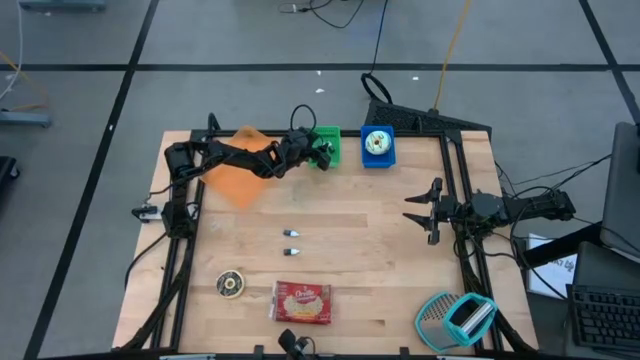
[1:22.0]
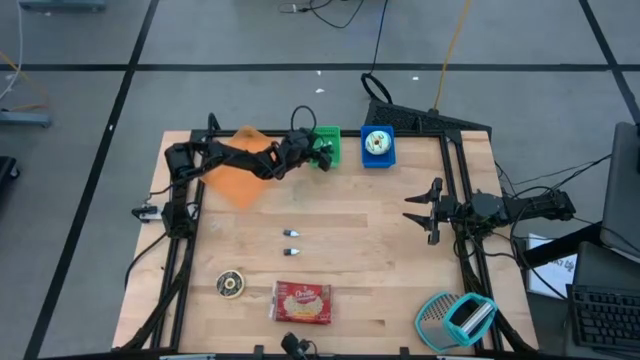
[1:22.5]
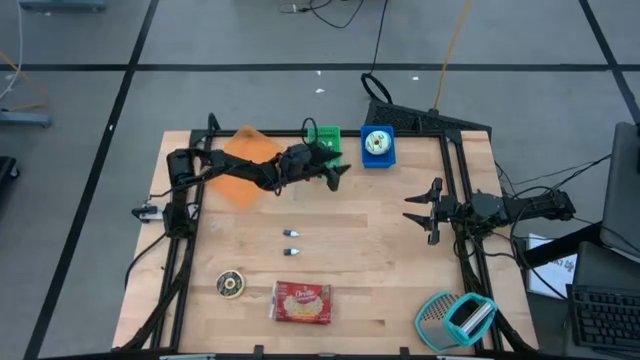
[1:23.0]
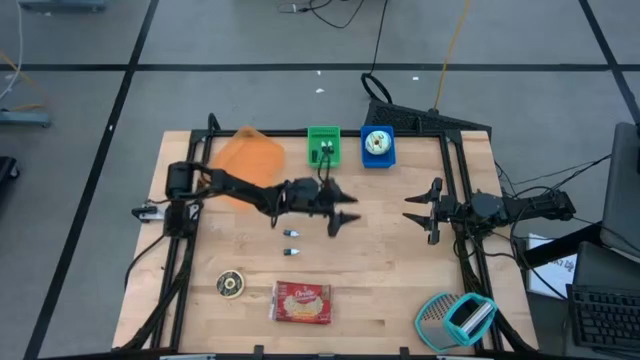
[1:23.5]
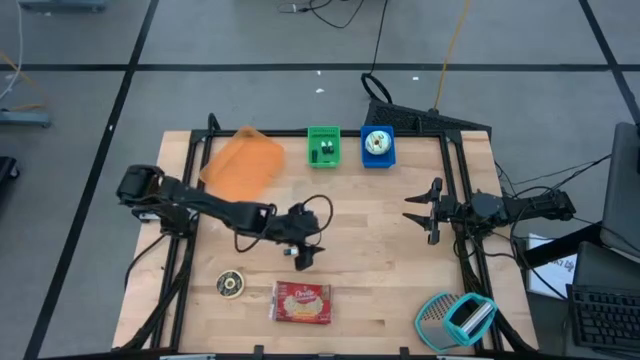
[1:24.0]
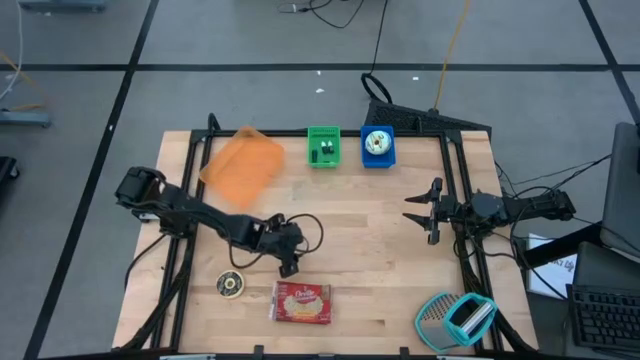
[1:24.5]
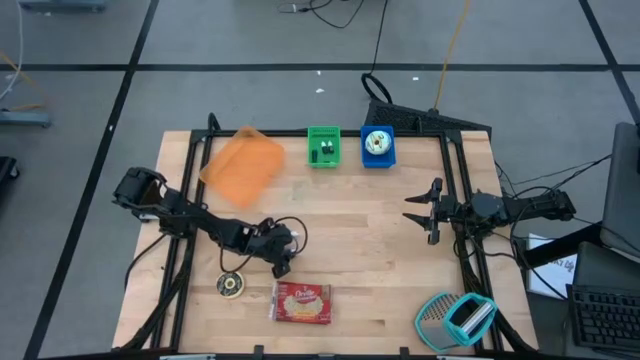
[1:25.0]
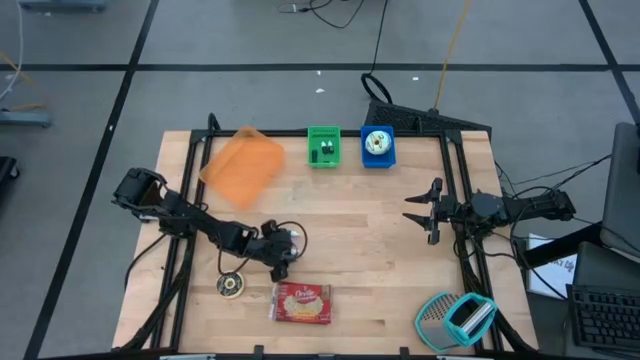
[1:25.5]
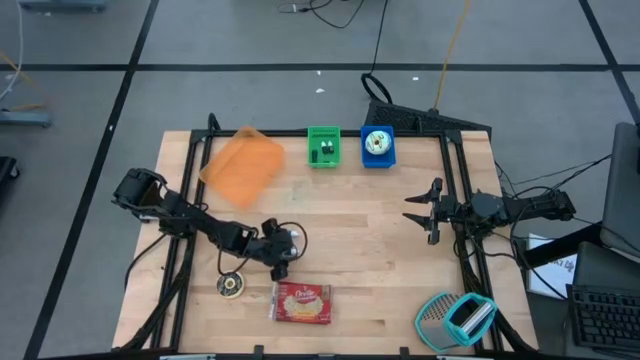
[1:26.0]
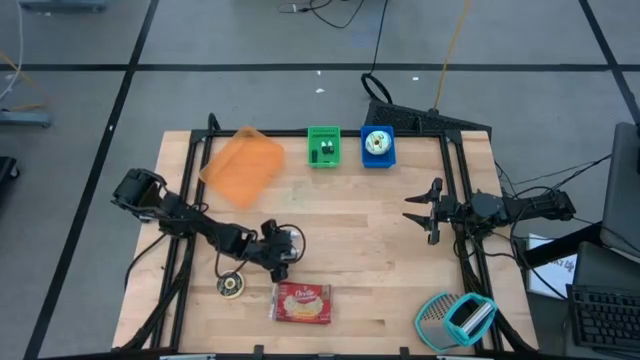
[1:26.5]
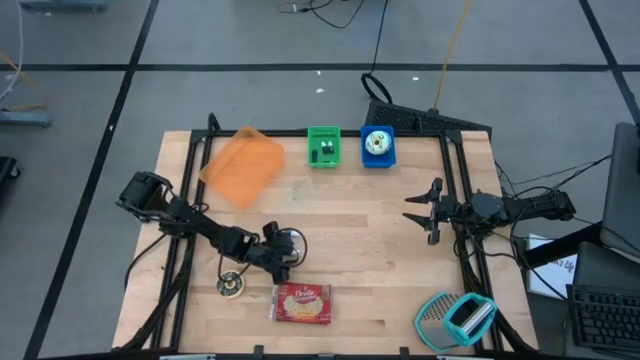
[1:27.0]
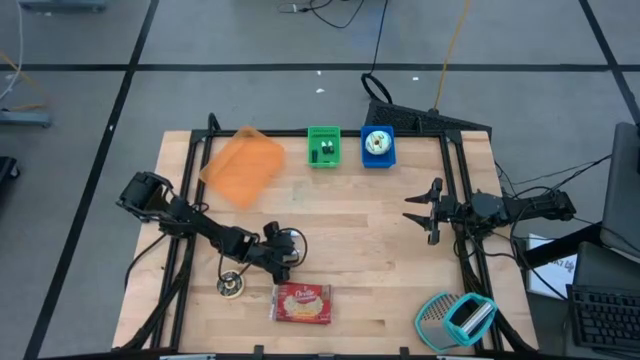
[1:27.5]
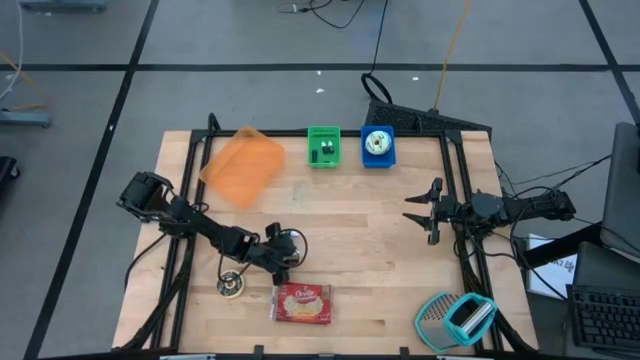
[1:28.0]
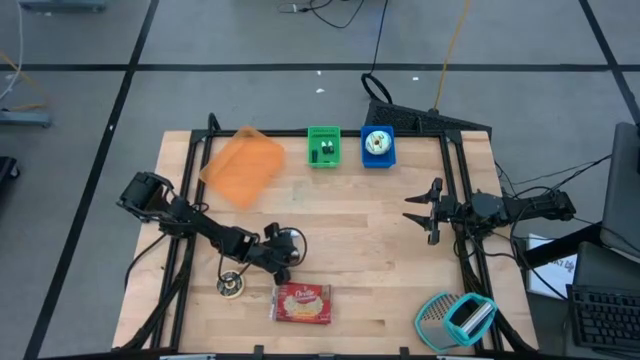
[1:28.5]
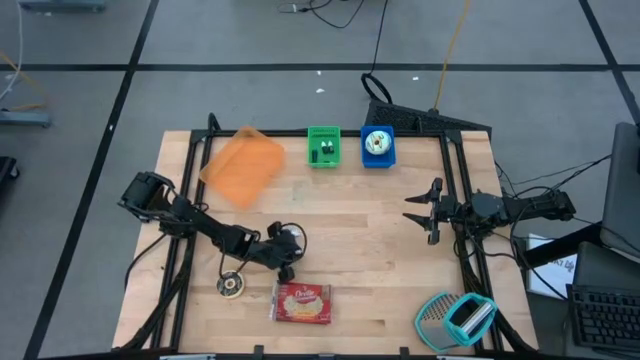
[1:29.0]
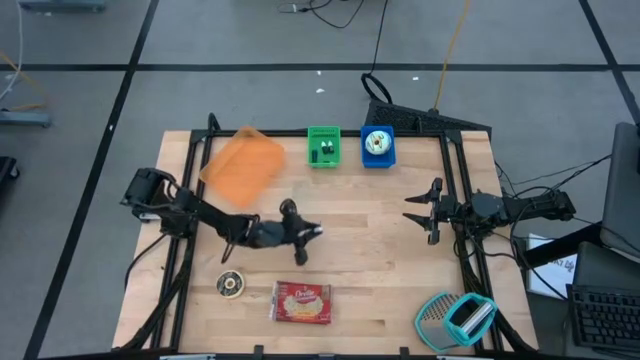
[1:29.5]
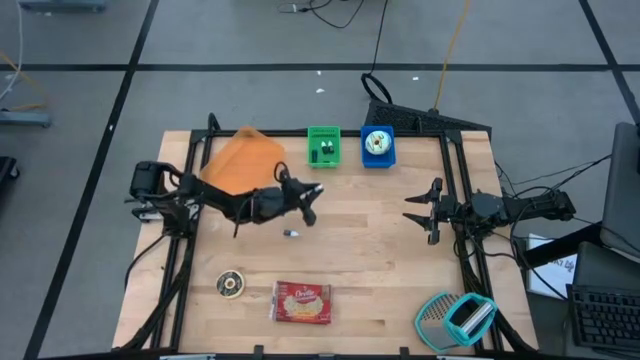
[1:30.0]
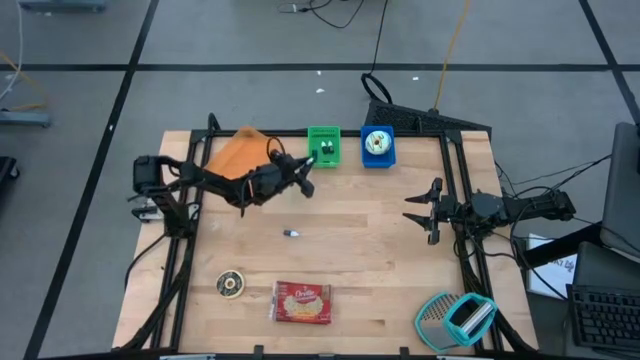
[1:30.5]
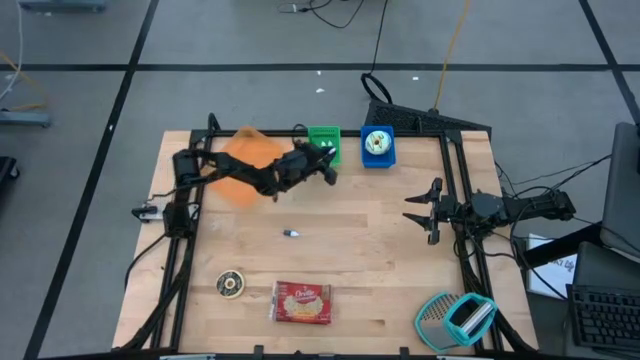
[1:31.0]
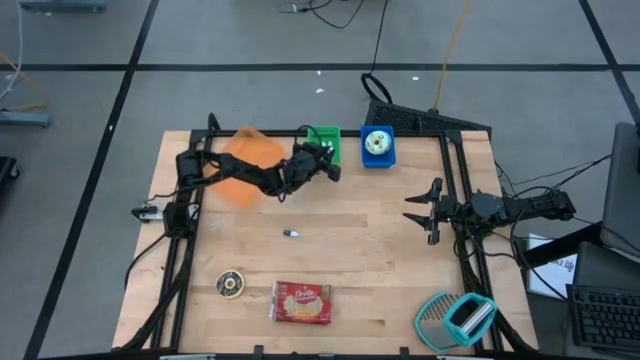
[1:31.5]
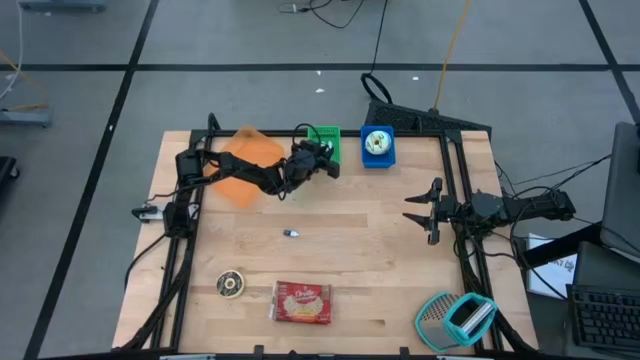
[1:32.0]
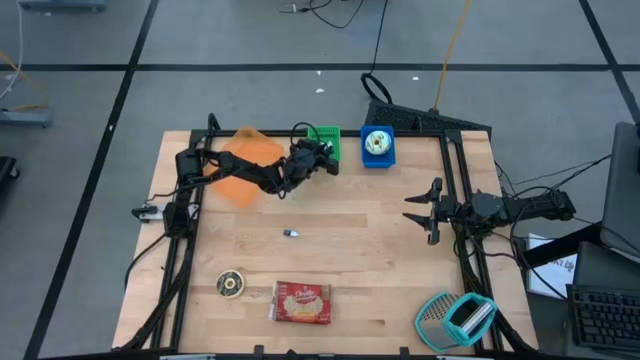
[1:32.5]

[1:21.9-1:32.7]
Put the black food coloring bottle into the green bin

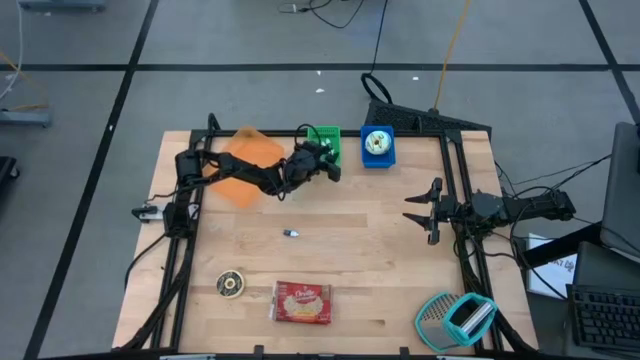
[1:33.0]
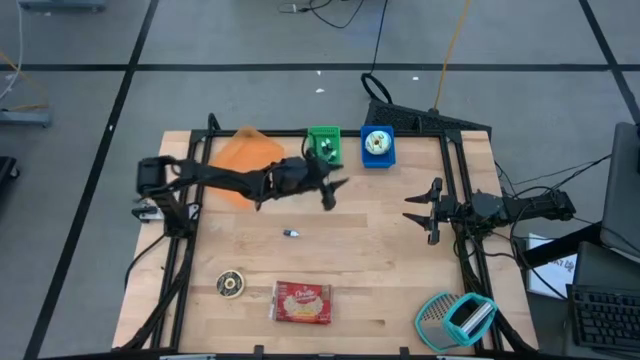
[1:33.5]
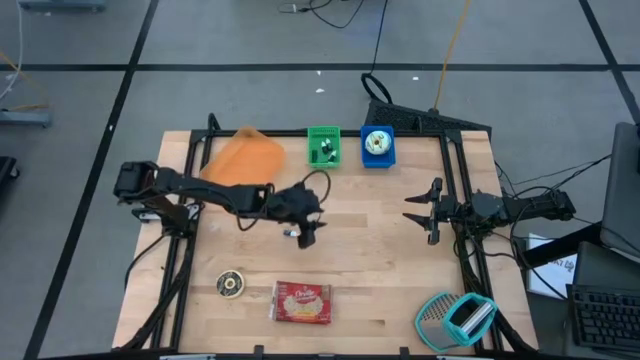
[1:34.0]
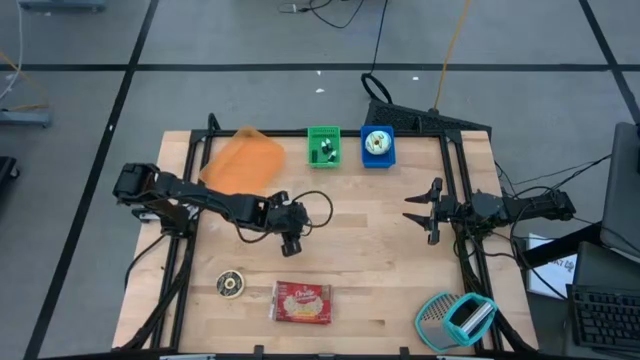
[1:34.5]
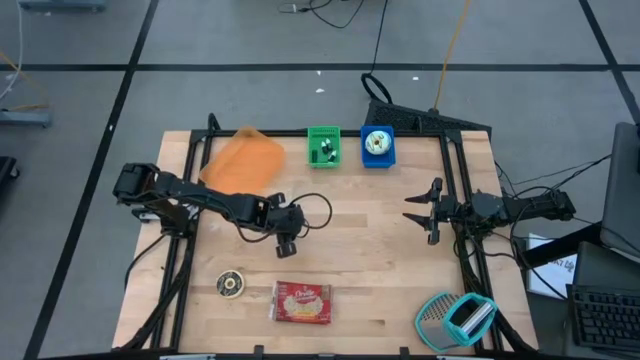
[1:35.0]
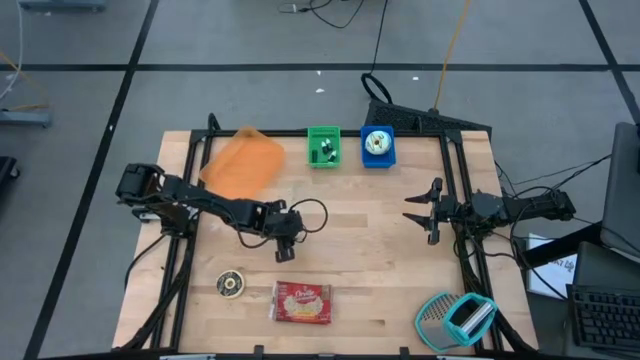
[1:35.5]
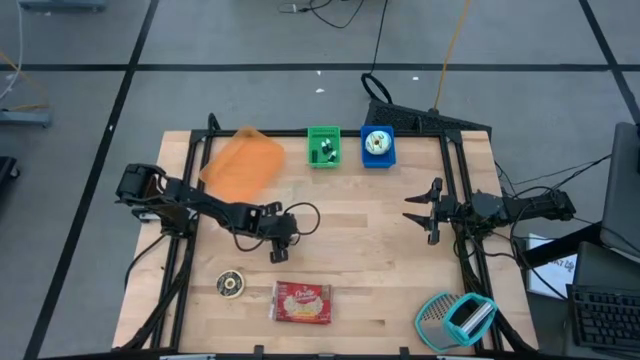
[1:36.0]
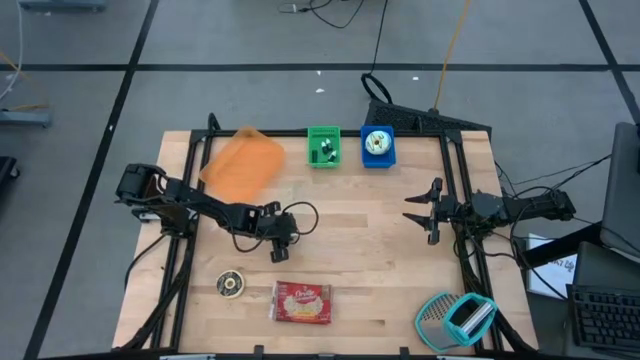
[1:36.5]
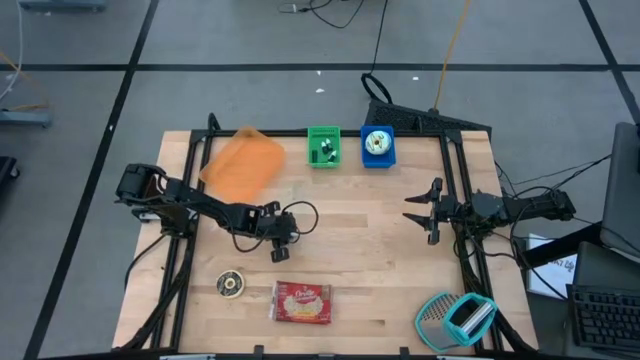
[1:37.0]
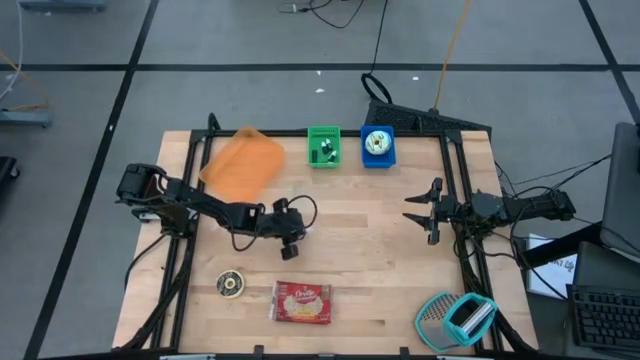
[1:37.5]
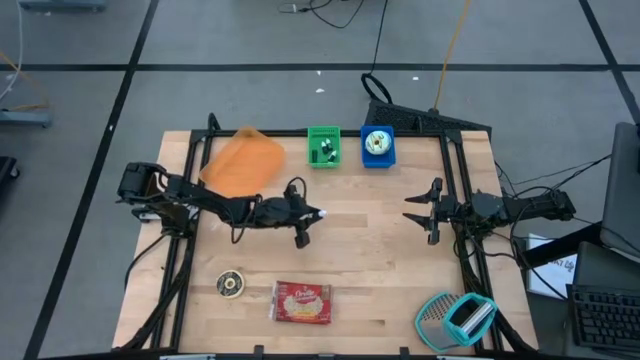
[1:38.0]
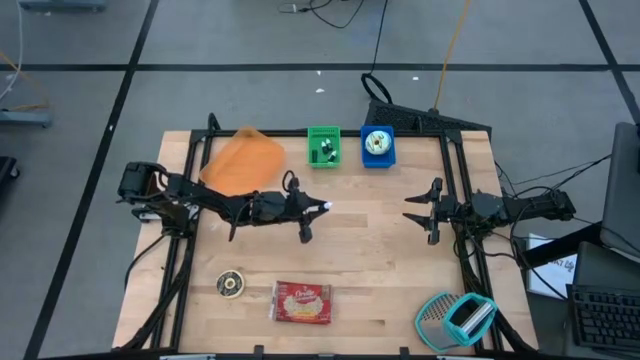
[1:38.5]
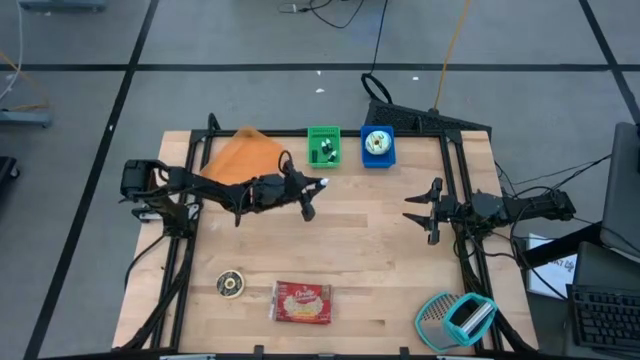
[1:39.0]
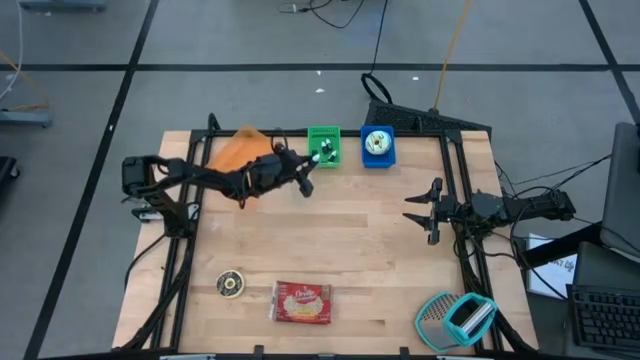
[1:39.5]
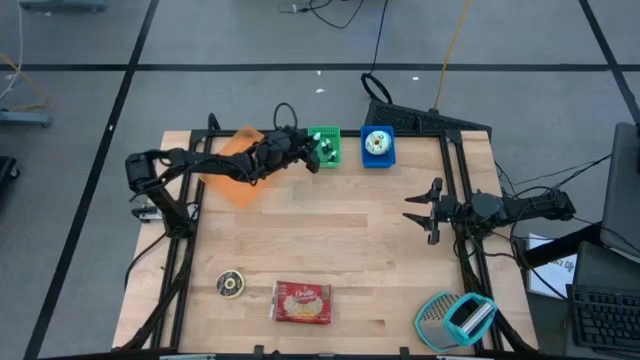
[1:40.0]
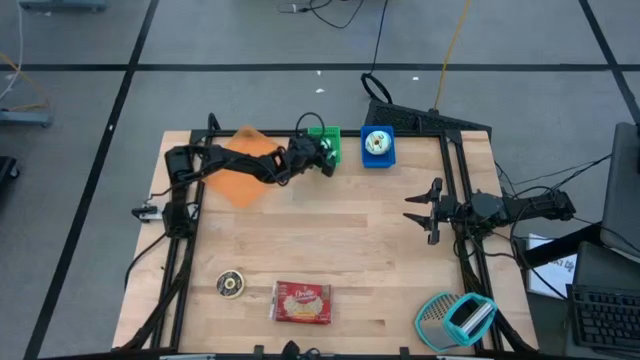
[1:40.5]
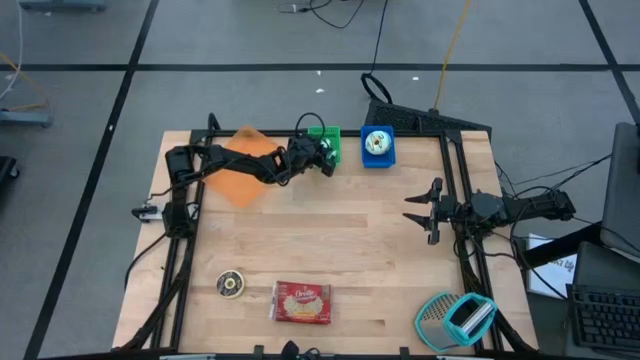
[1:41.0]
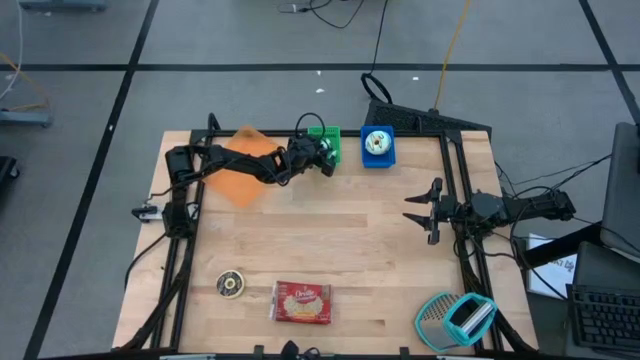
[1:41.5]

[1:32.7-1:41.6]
Put the dark blue food coloring bottle into the green bin
